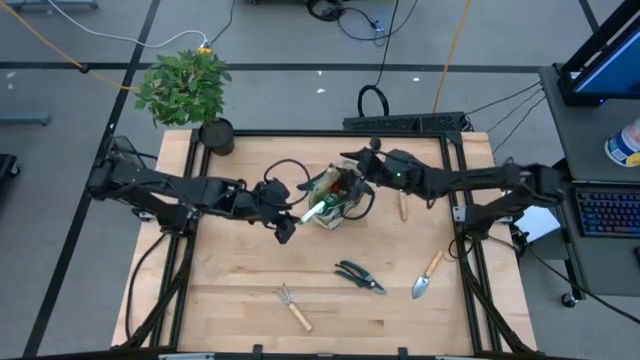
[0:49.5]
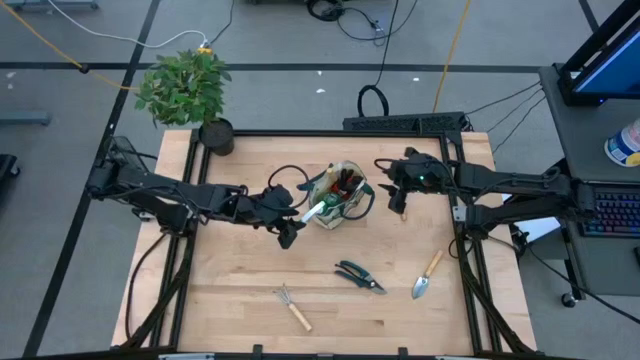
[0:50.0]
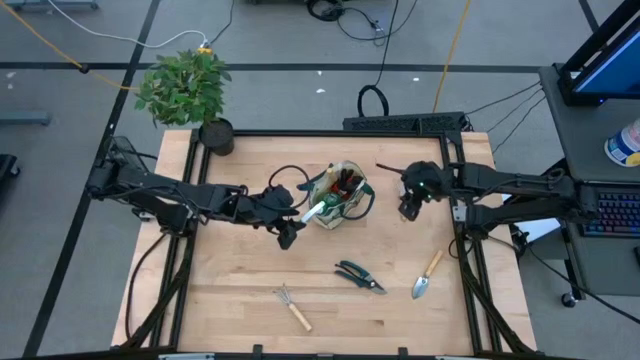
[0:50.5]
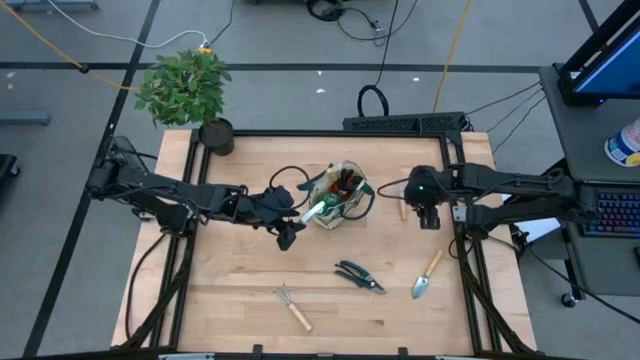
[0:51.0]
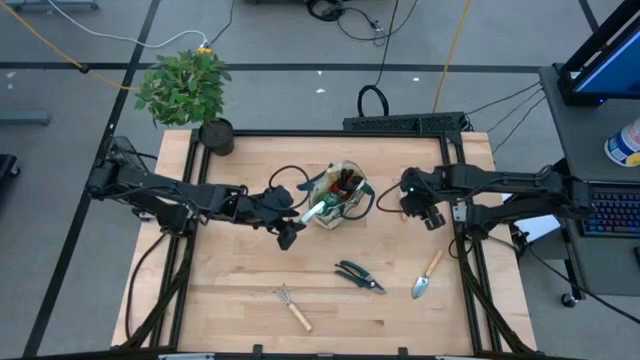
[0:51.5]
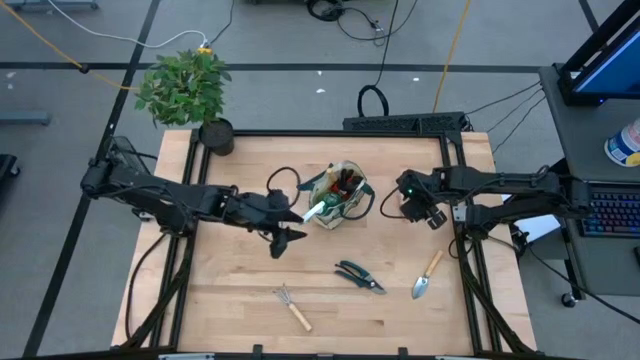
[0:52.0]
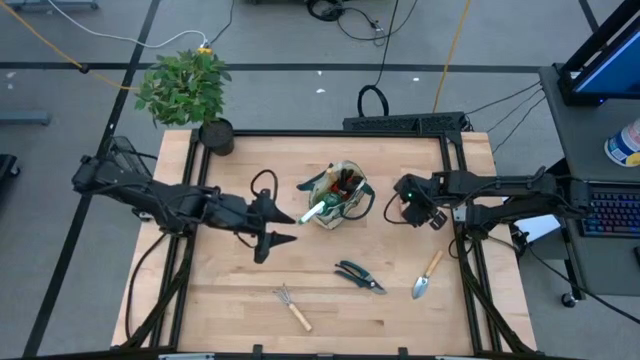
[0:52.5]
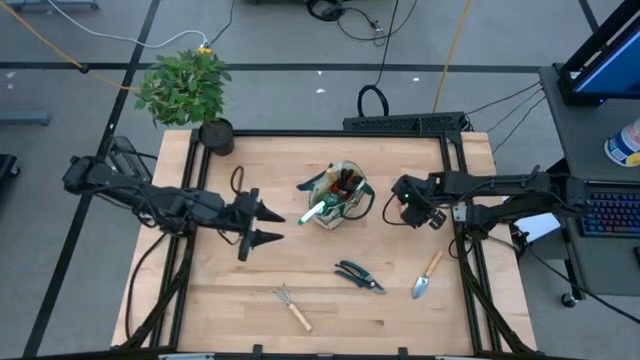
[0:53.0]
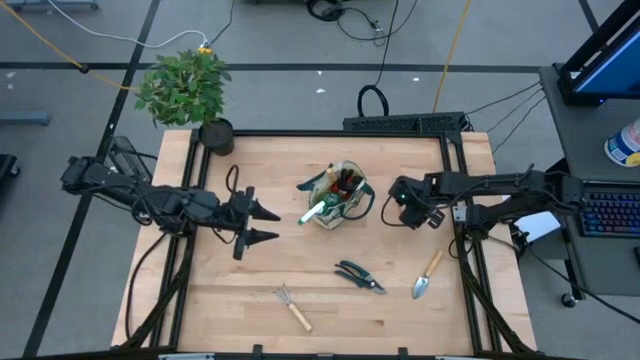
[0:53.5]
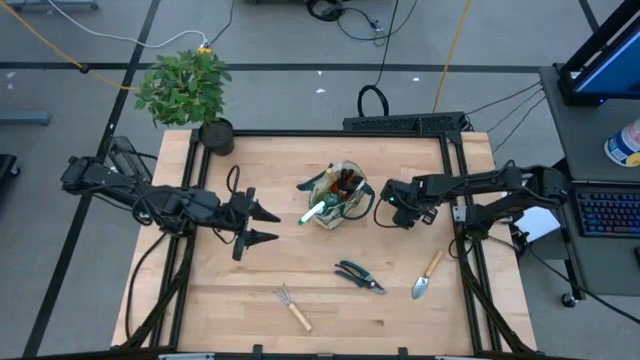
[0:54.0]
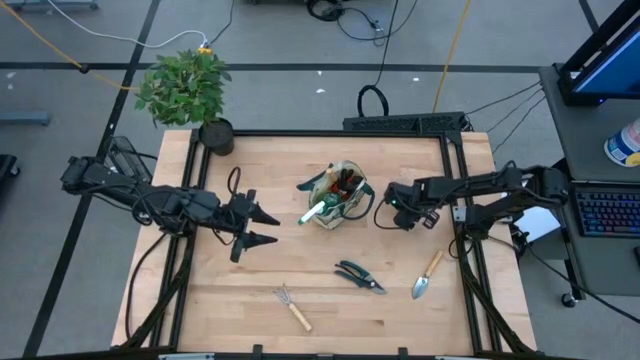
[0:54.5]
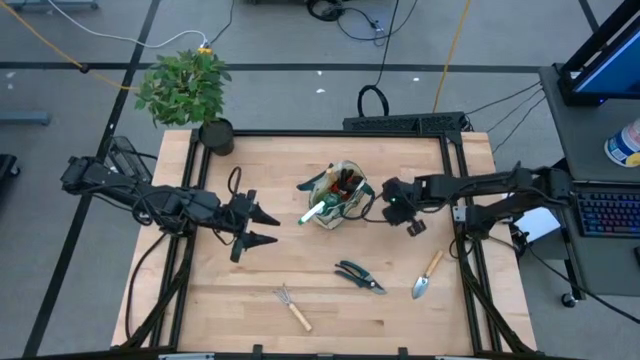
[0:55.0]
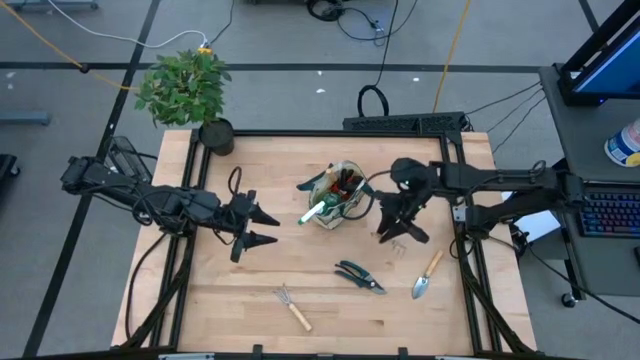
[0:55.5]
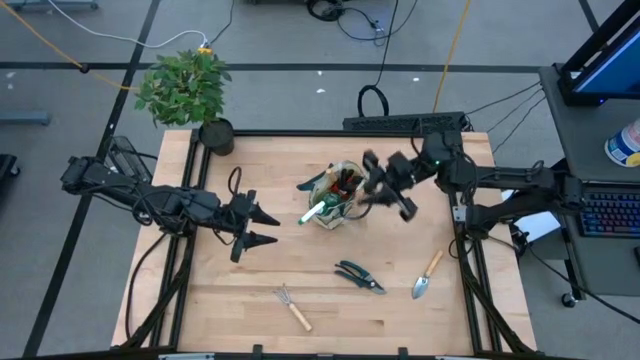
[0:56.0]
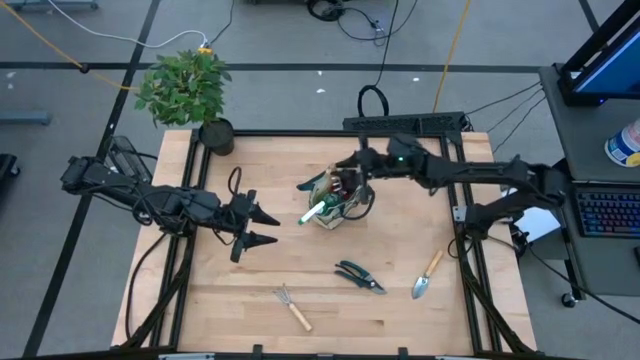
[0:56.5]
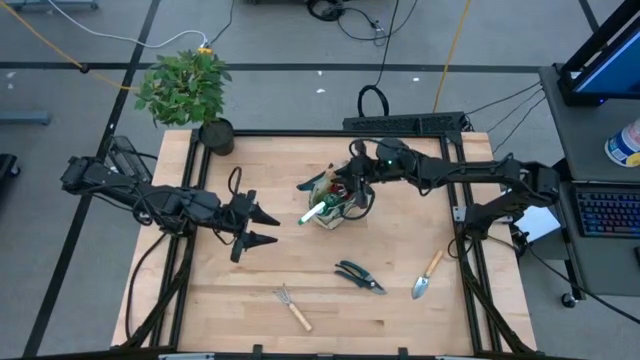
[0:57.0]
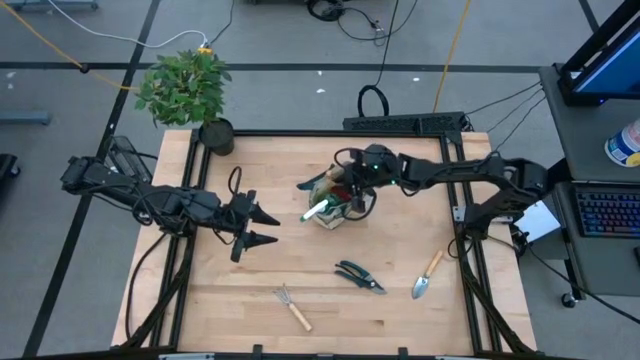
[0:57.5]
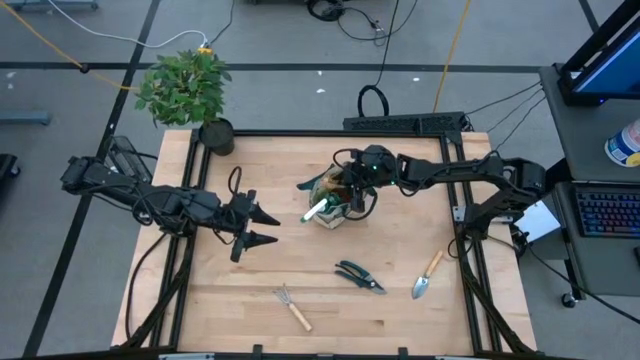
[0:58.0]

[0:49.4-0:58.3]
Task: Pick & Place Garden tools in Gardening bag
Put the right light brown hand rake into the light brown gardening bag

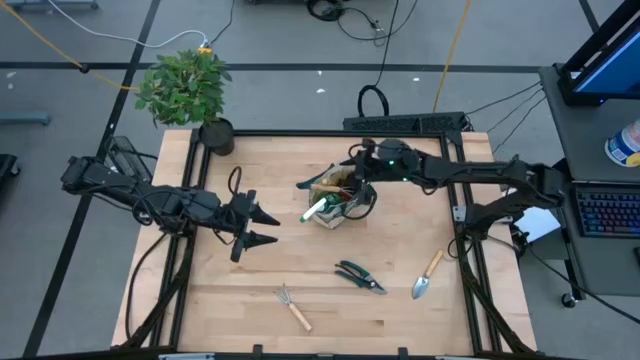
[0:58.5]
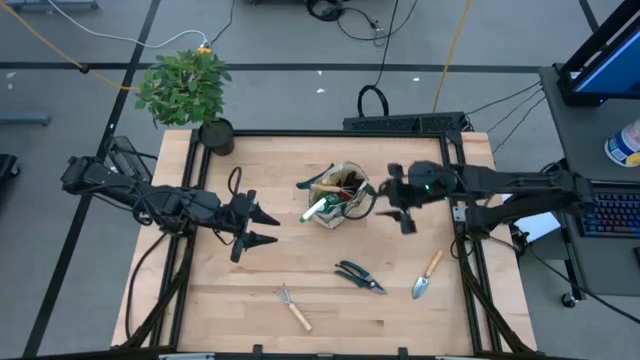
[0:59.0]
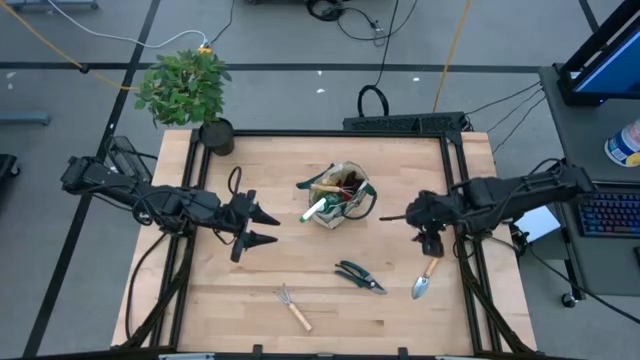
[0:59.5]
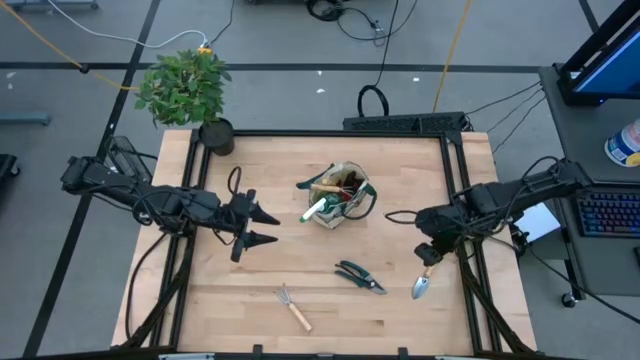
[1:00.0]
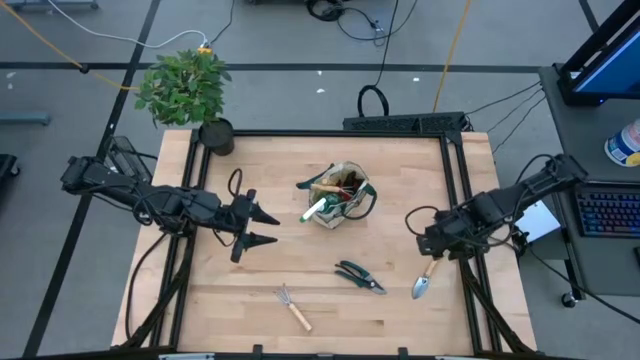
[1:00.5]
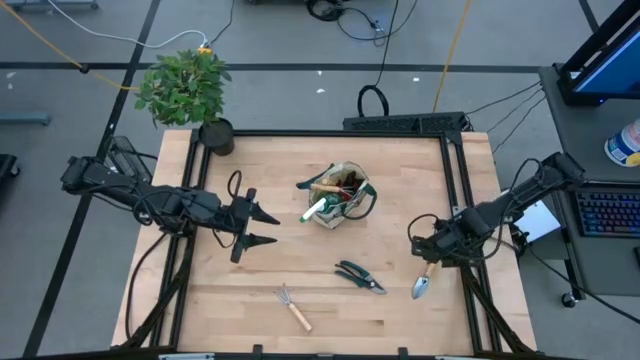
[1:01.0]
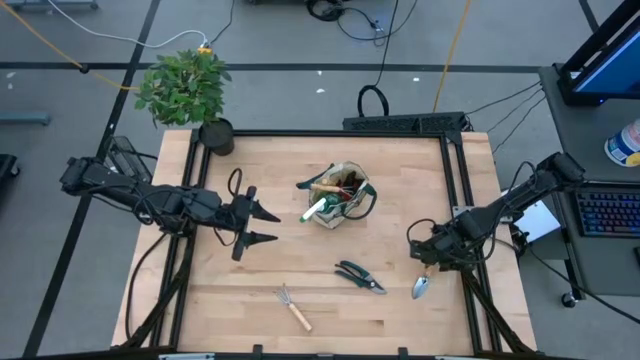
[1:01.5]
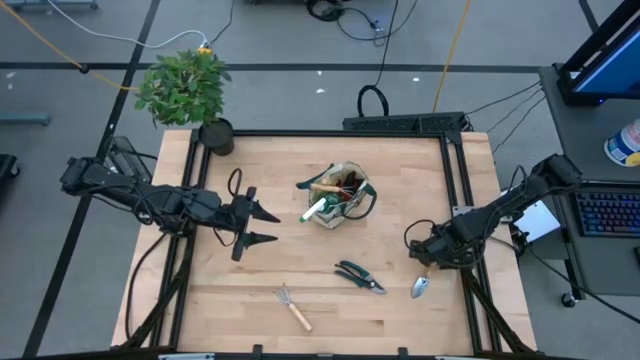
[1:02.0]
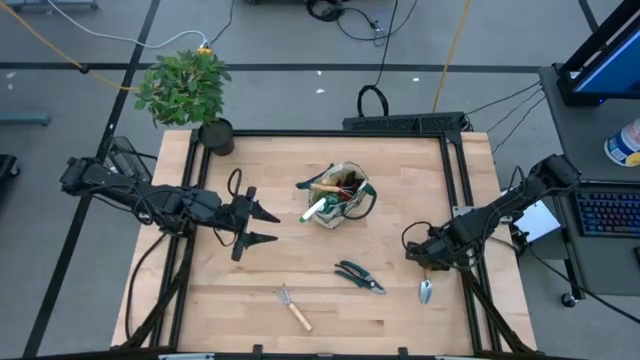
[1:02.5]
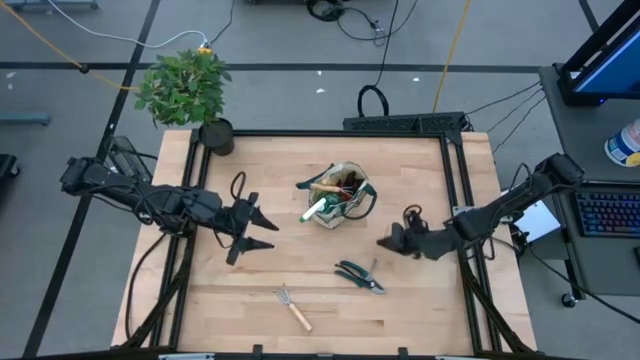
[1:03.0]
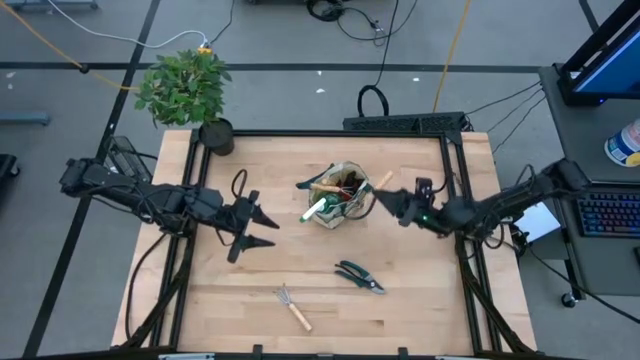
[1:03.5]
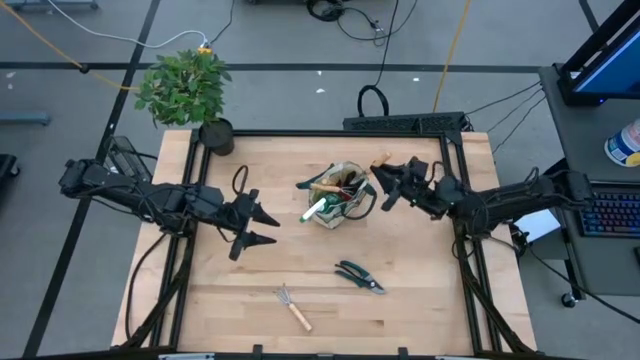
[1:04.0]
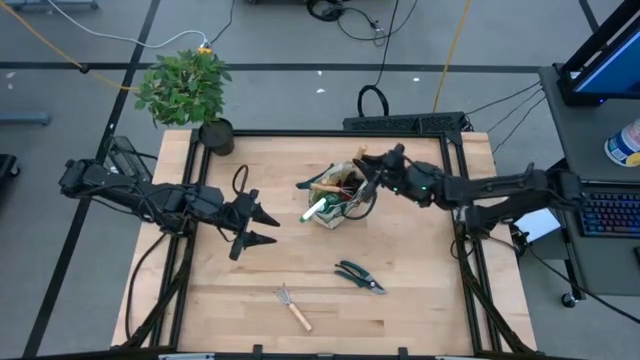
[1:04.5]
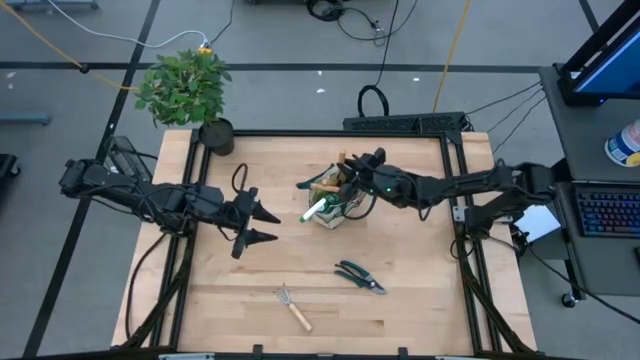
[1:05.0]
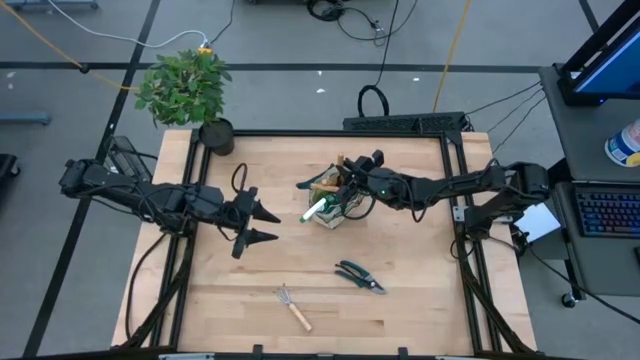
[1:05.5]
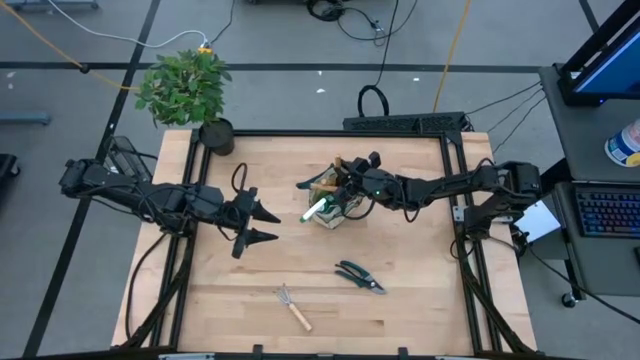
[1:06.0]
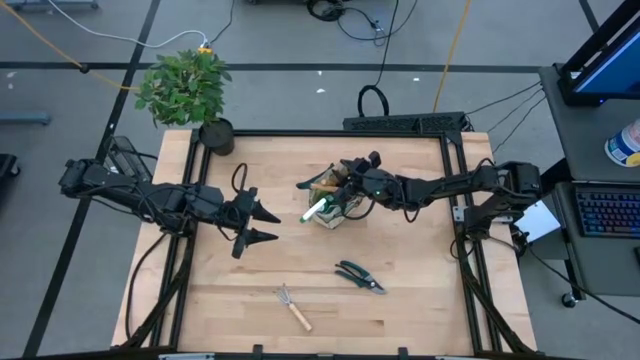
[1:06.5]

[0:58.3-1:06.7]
Put the light brown trowel in the light brown gardening bag
